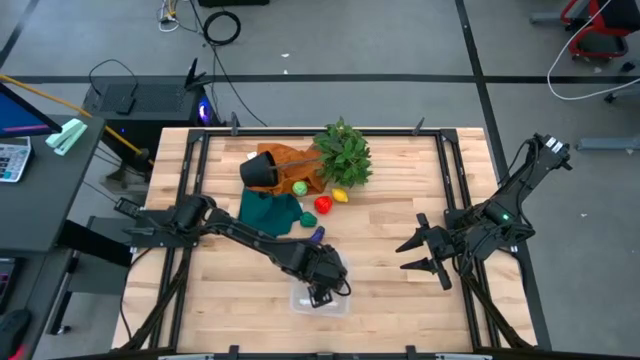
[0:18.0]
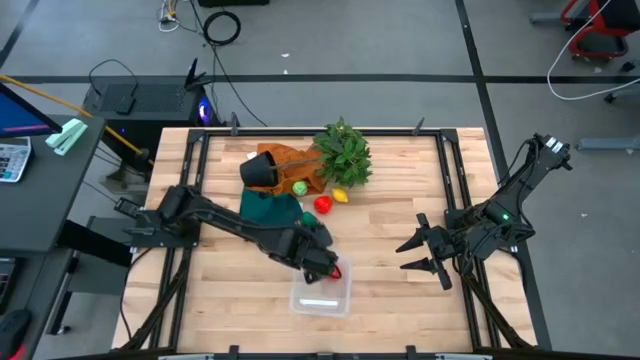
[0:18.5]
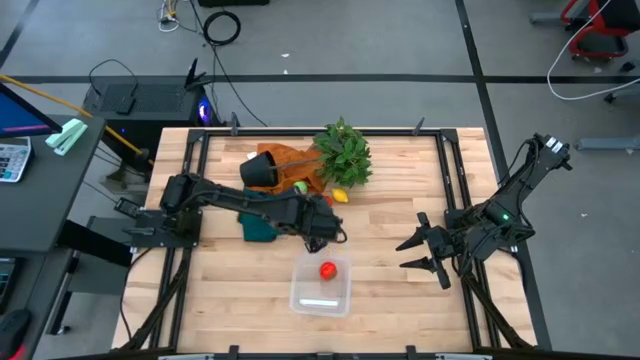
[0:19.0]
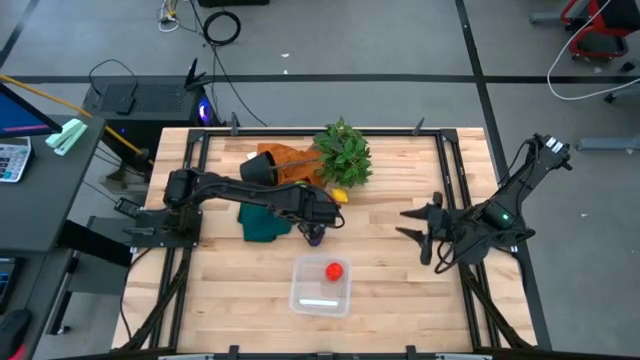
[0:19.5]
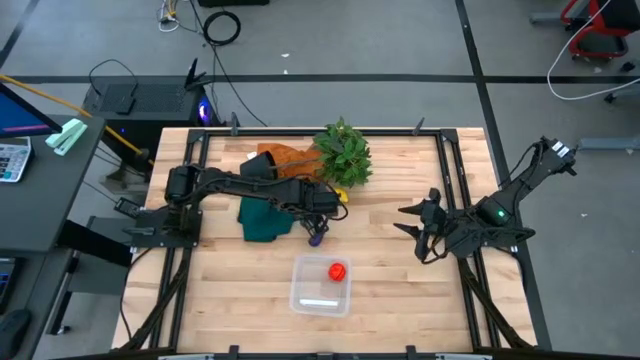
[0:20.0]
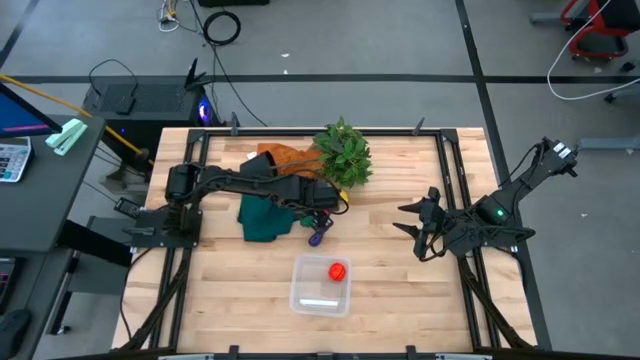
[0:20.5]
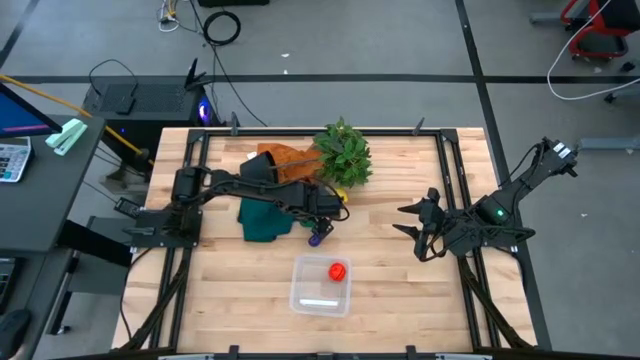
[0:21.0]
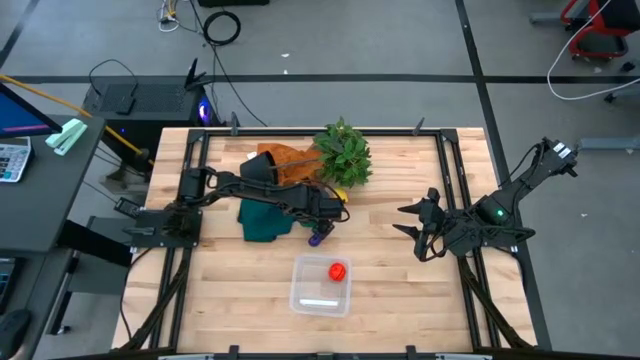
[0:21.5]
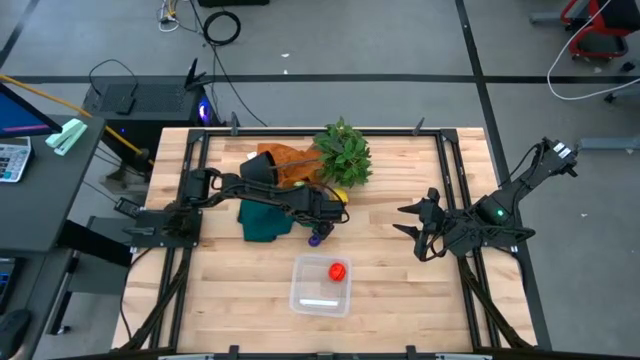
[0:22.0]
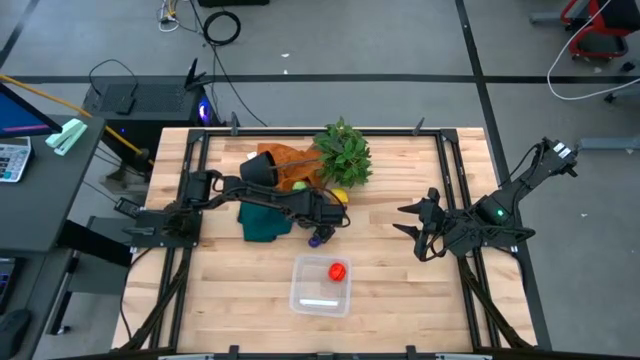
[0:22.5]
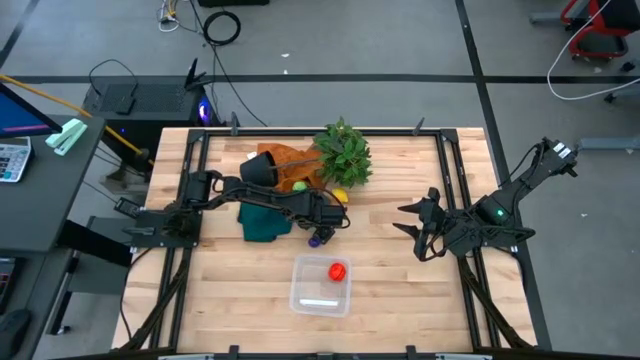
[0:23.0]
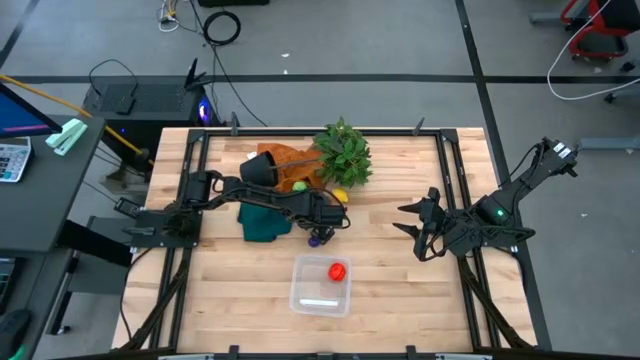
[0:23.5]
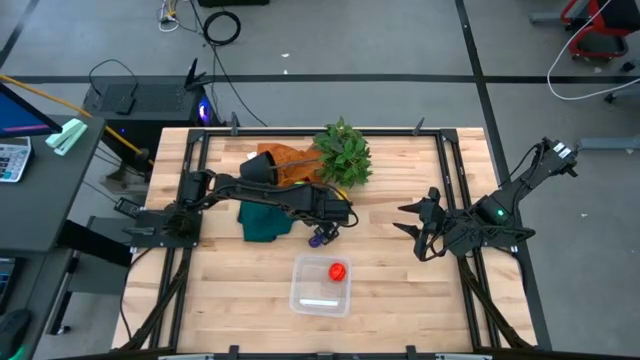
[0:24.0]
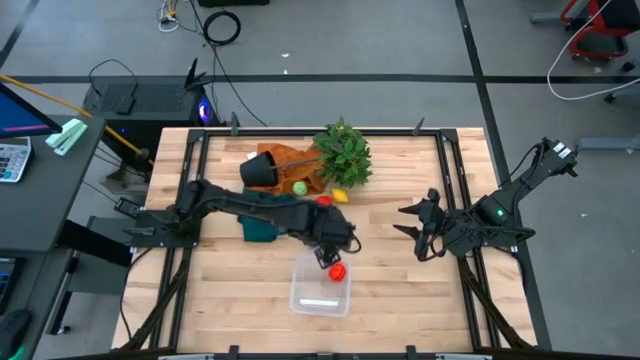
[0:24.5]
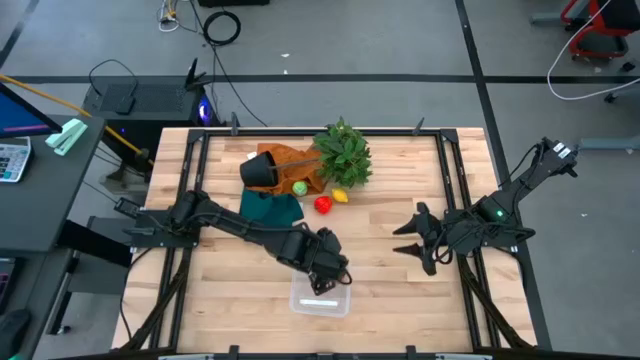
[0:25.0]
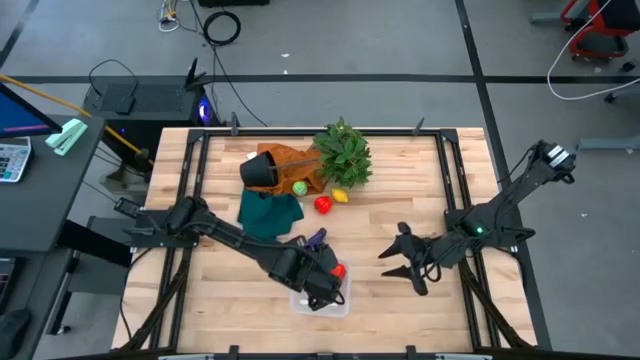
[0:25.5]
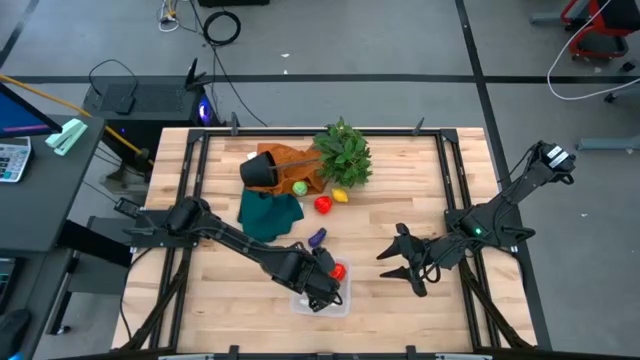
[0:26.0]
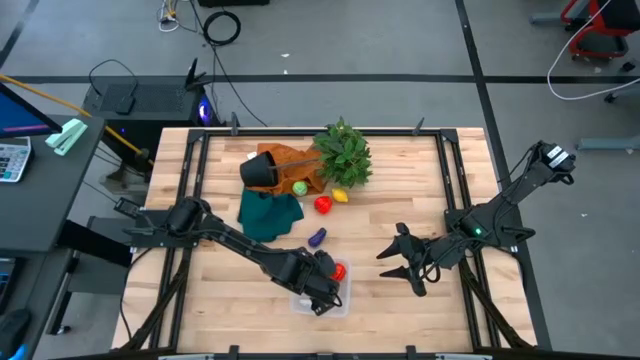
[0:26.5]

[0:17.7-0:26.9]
Task: Pick and placing Produce into tupperware
Put the green bell pepper into the transparent bin

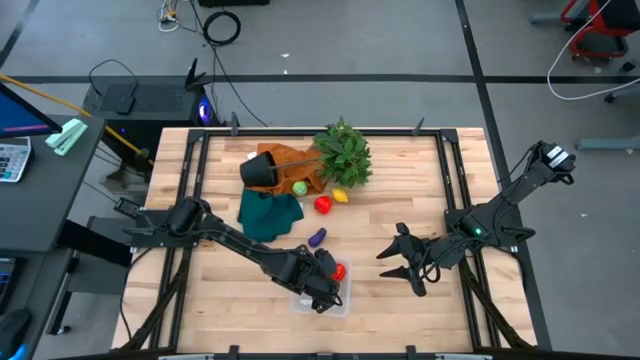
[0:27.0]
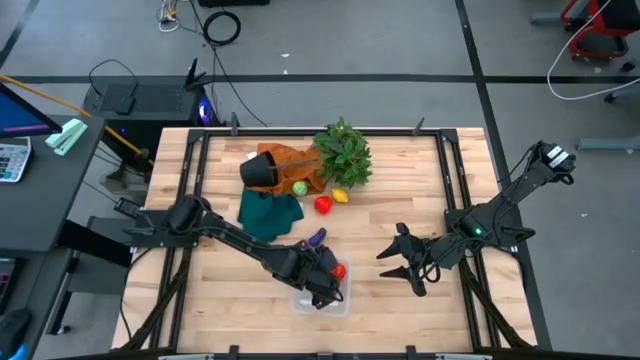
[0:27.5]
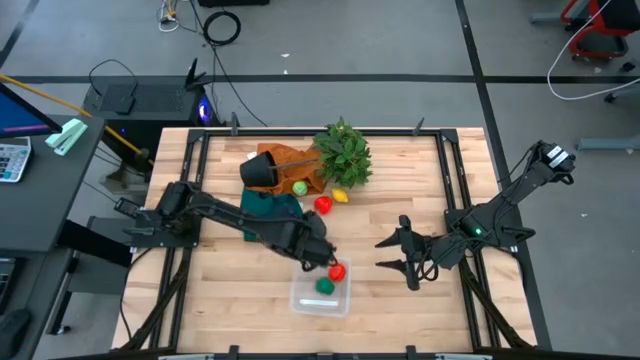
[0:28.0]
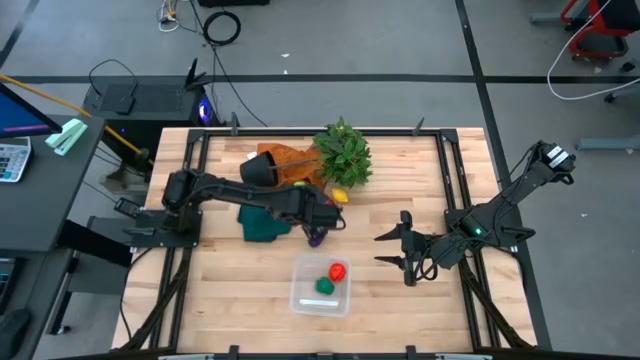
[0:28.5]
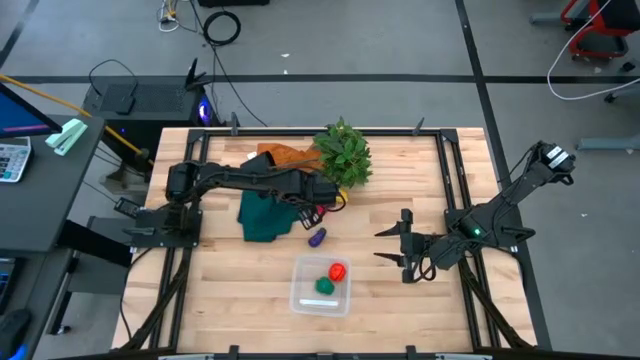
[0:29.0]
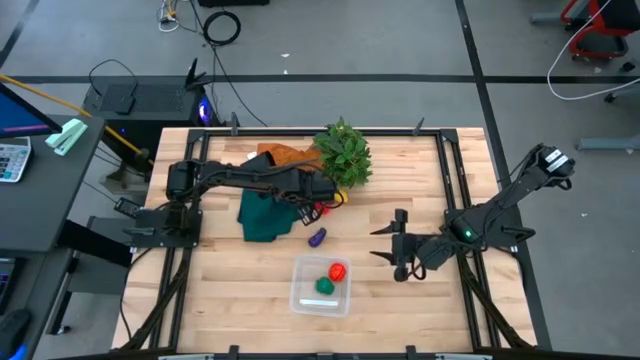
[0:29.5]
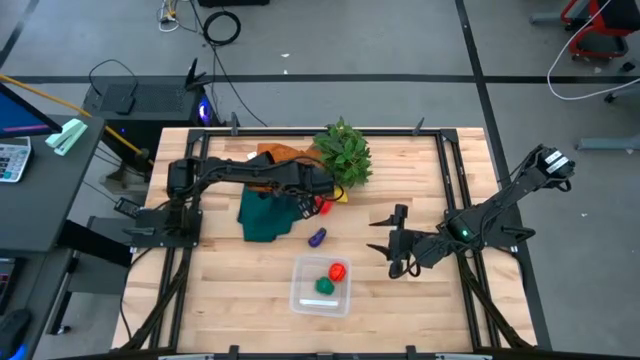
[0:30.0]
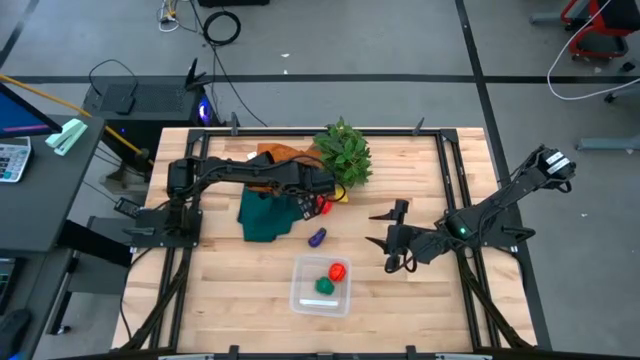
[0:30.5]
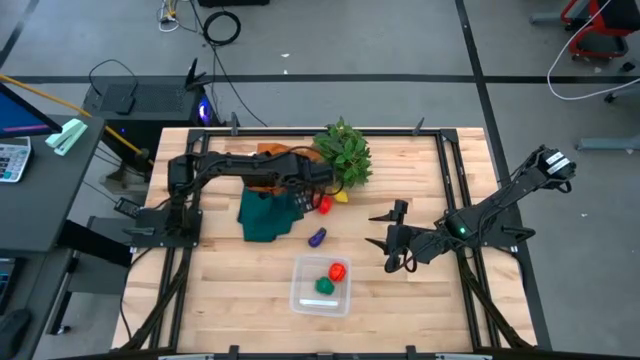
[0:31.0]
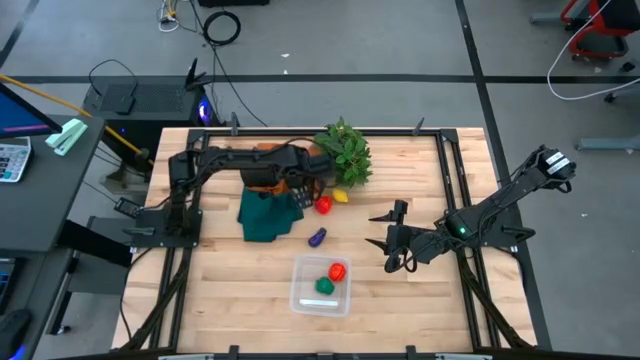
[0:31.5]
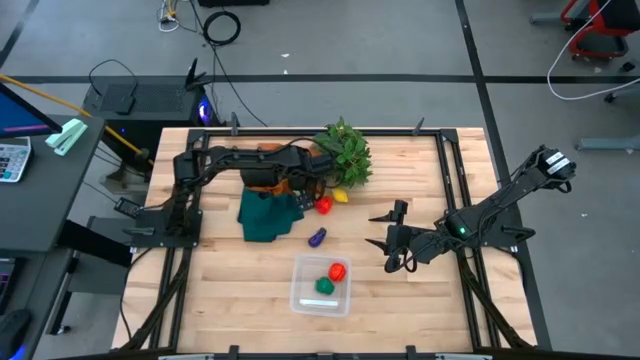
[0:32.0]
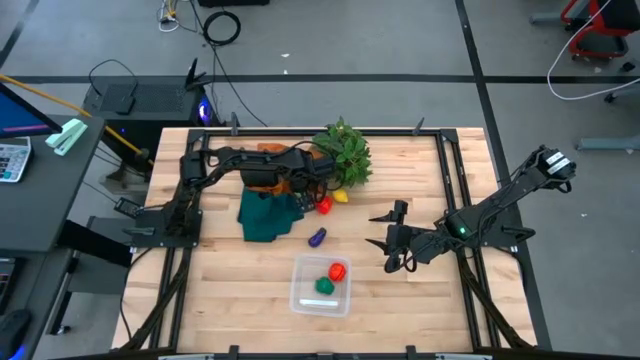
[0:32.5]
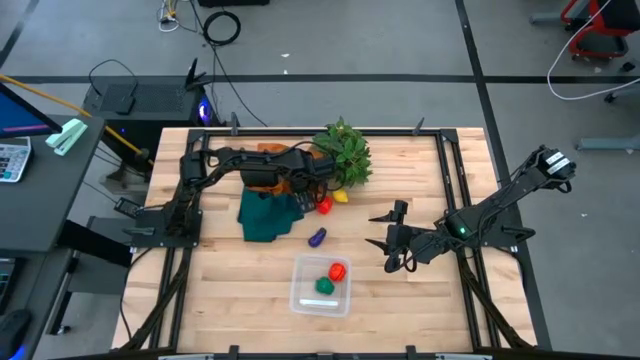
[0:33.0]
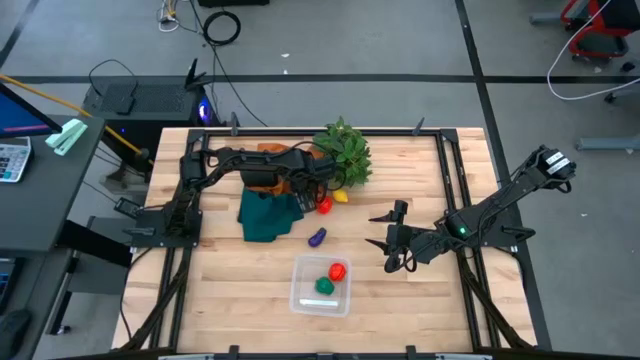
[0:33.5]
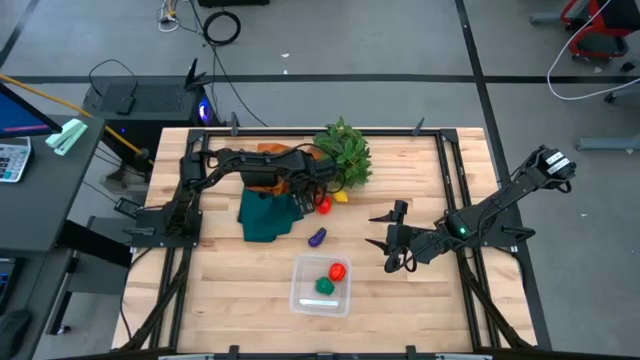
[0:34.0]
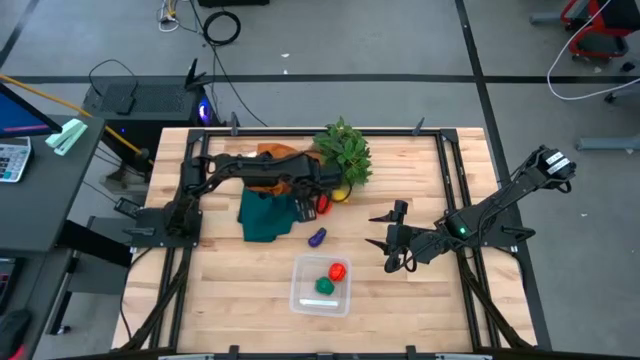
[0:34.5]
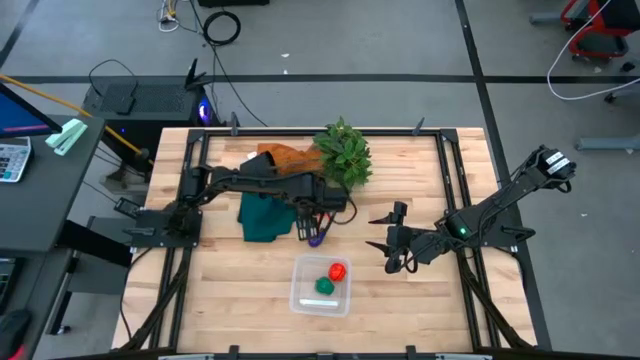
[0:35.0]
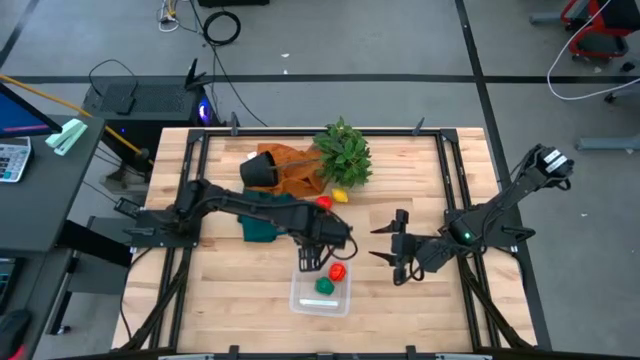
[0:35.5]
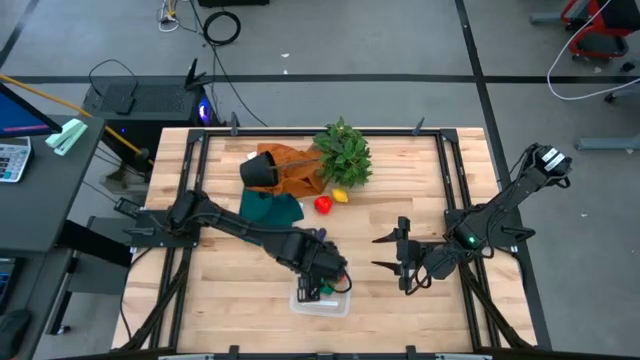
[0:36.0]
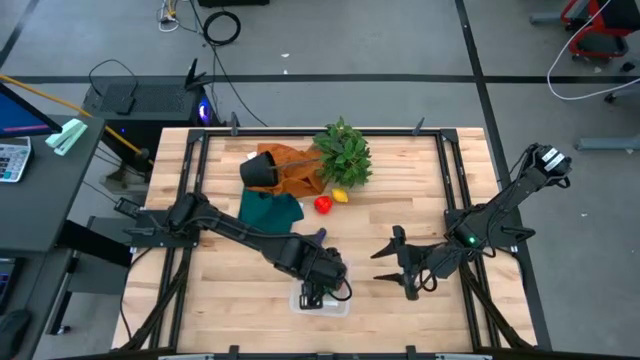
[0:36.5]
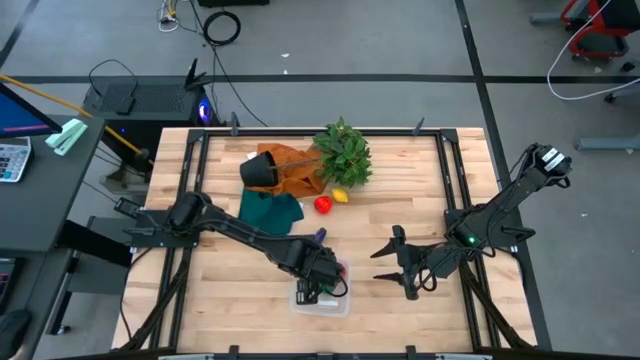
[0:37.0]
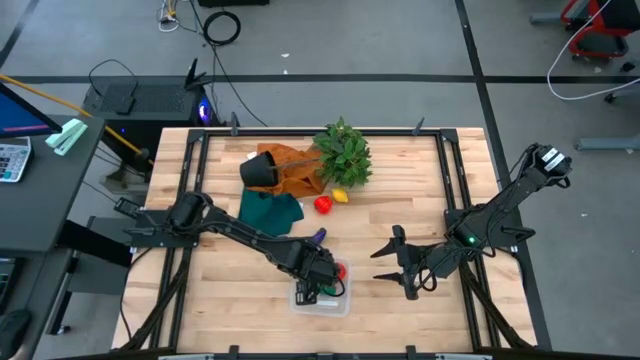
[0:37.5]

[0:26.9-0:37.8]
Put the green cabbage into the transparent bin

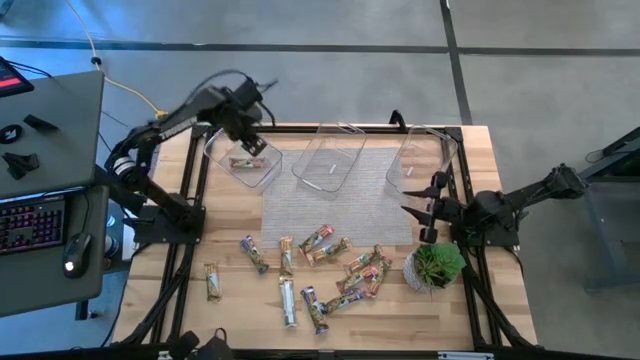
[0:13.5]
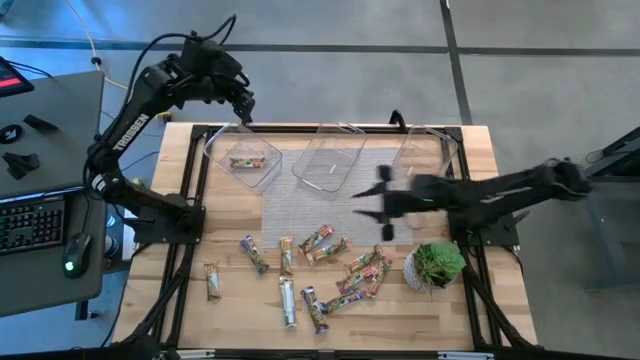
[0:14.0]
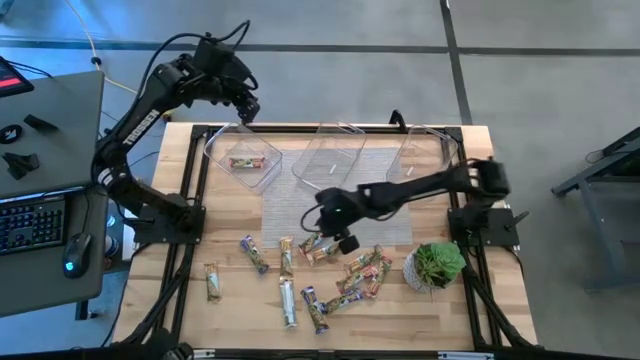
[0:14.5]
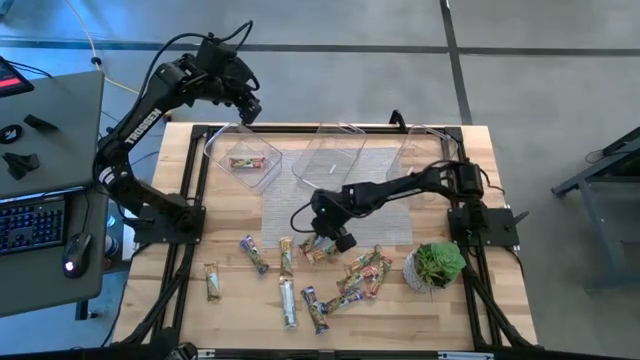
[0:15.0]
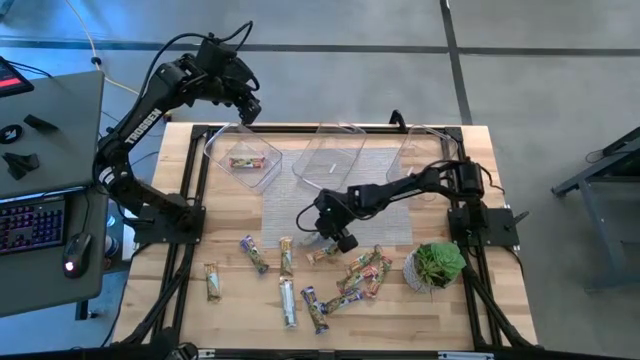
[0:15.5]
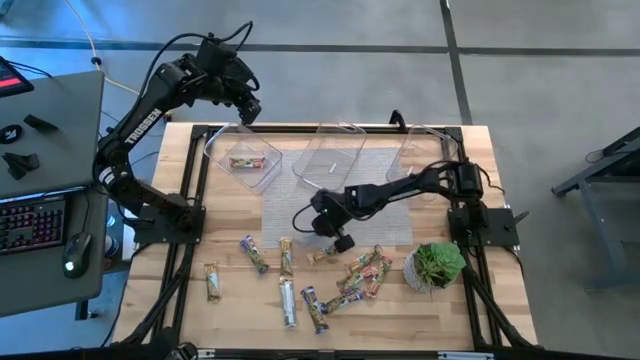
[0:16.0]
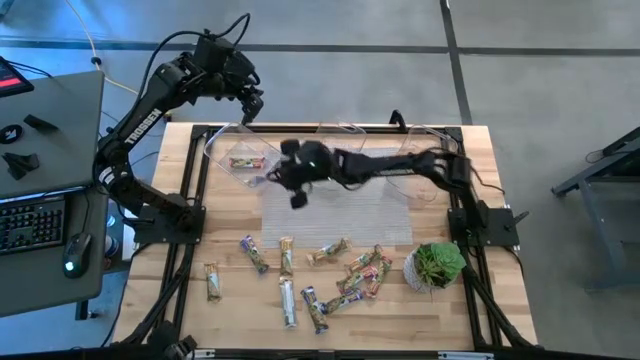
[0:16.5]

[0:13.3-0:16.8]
Task: Pick and place Granola Bars by type
Put the red granola bar into the left transparent bin
